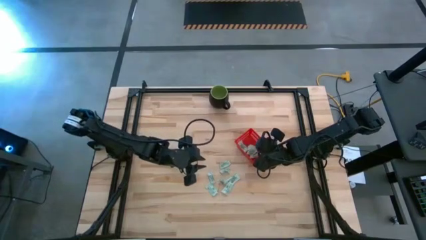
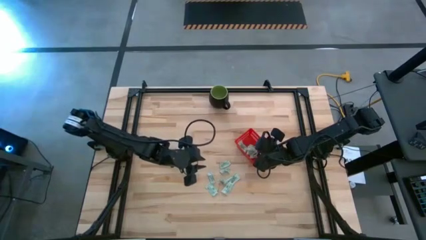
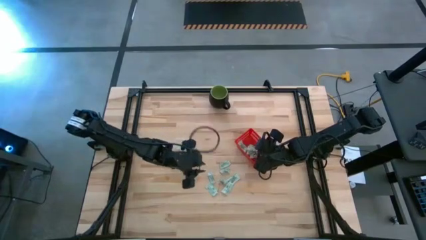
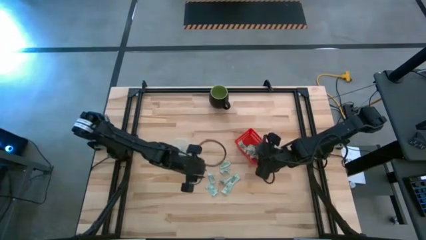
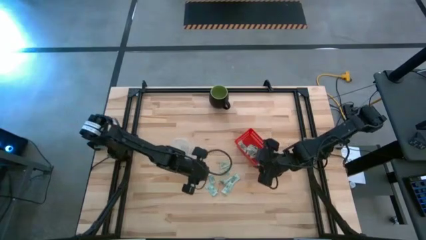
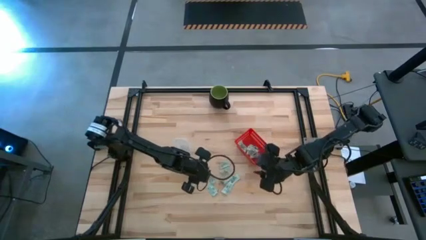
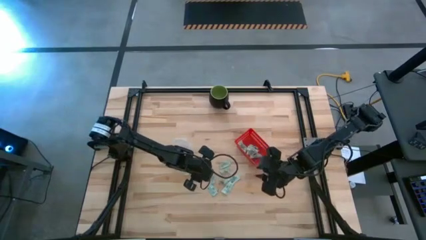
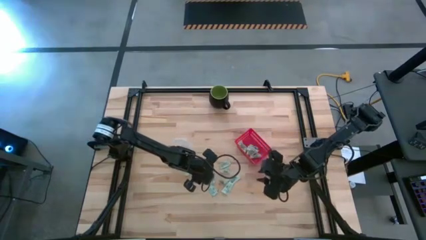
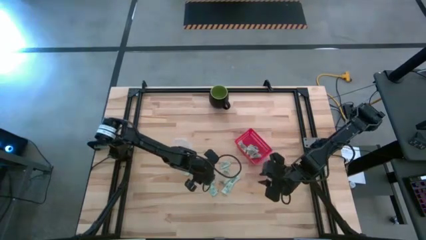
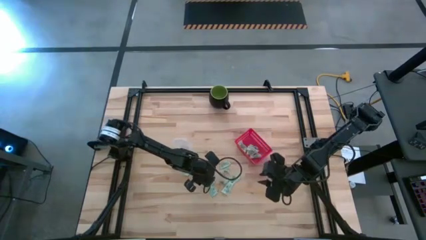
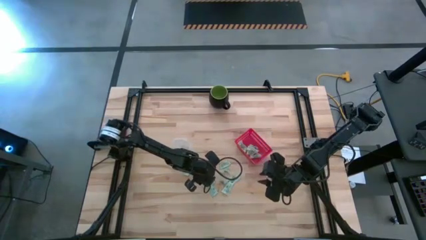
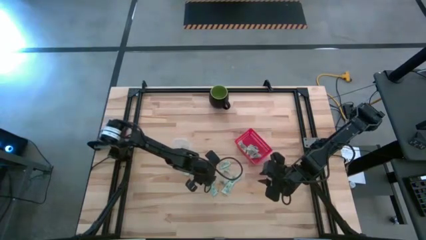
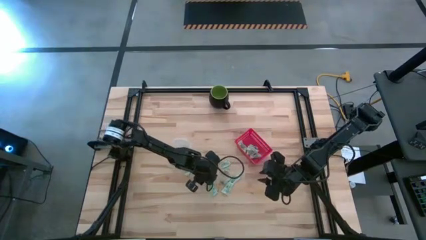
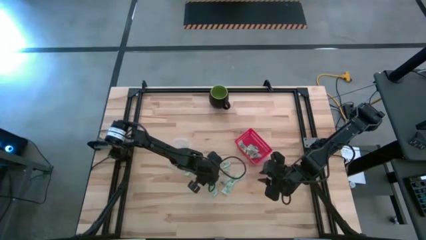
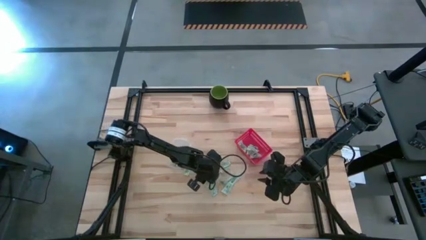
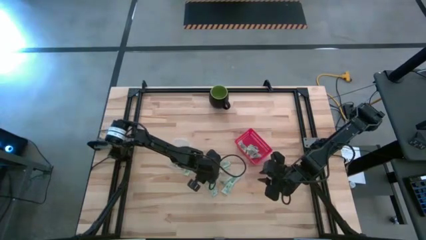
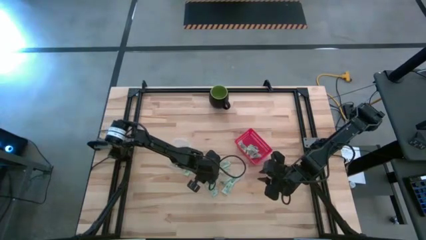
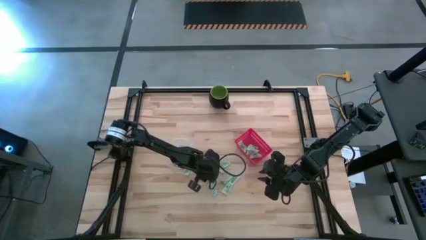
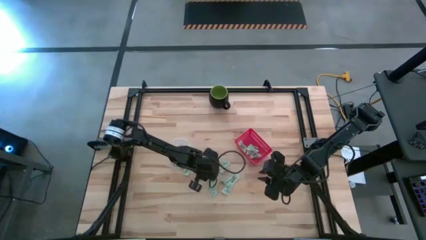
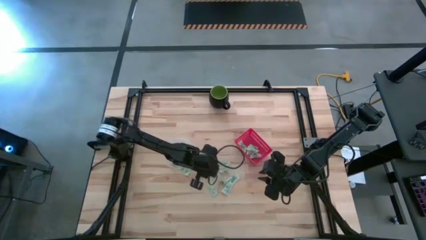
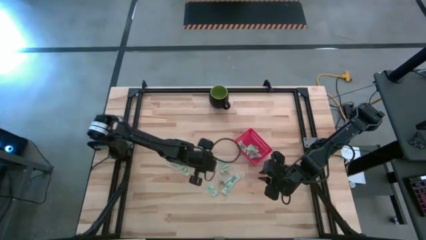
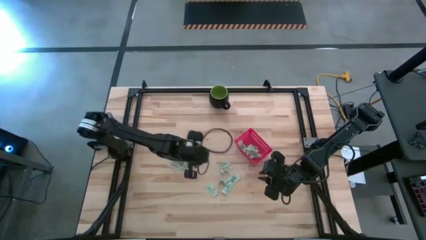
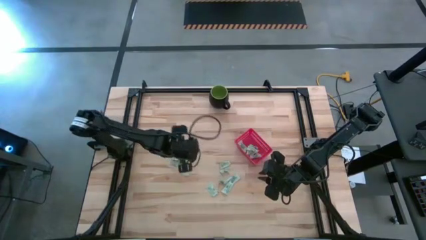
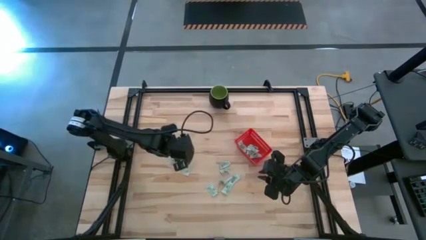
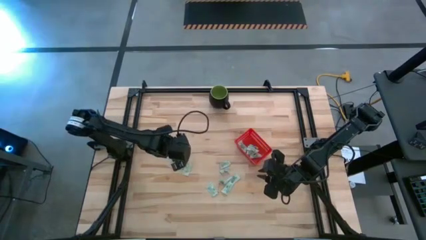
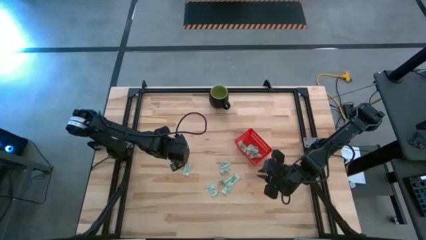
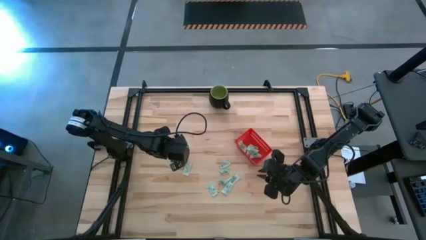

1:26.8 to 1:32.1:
Task: Pick and place items into bin
Put the stevia packet into the transparent bin

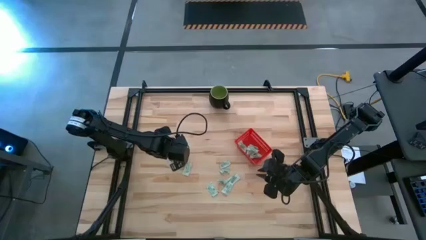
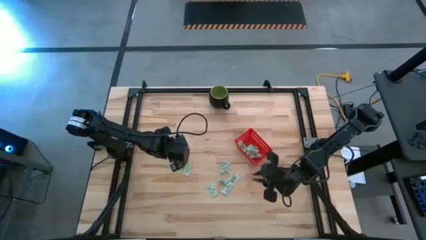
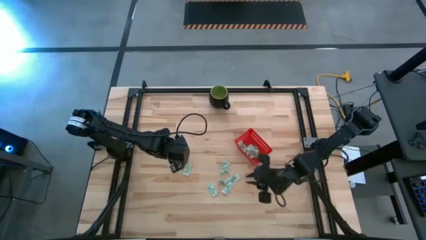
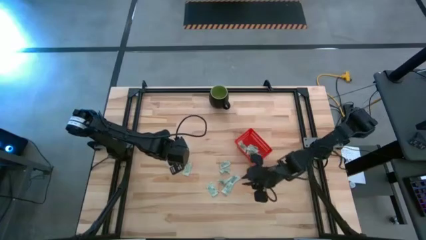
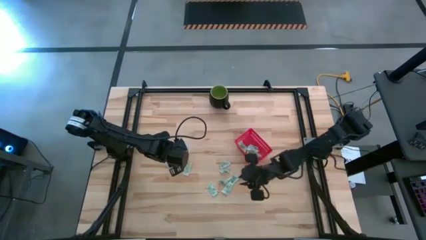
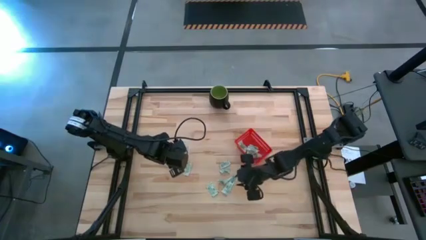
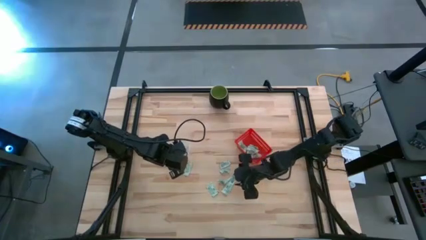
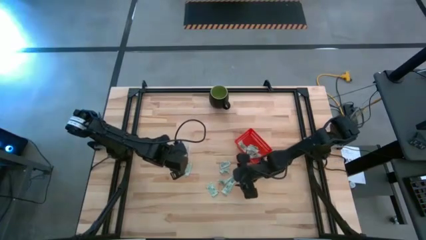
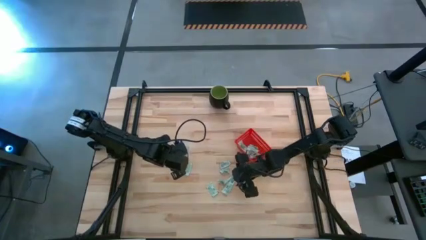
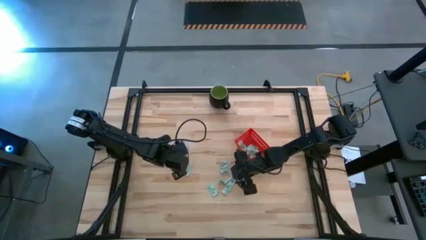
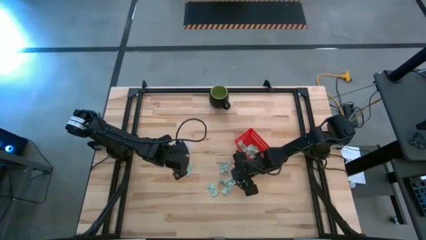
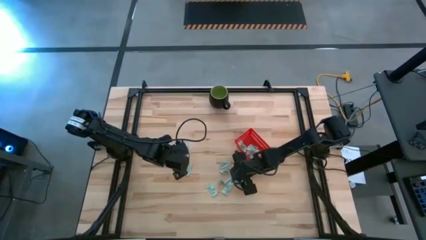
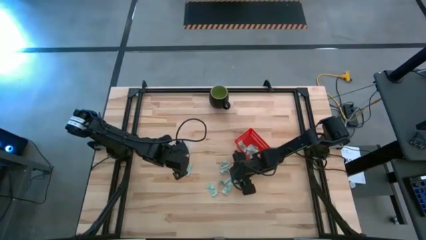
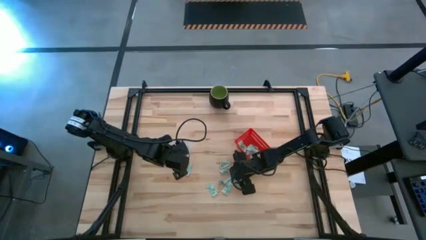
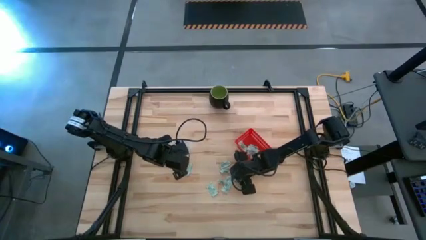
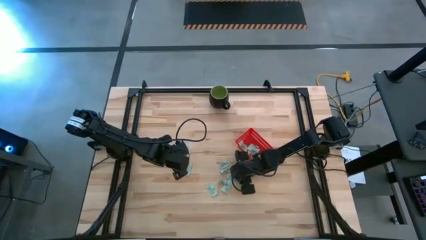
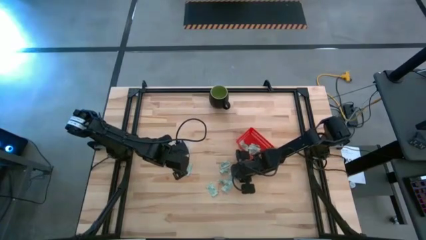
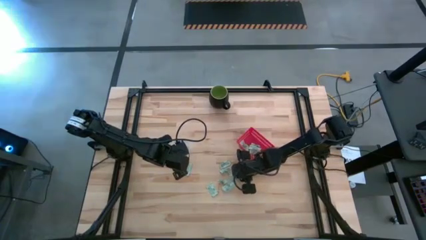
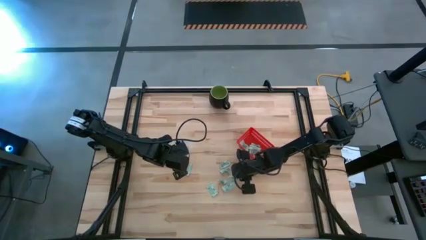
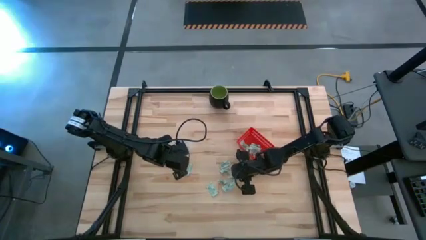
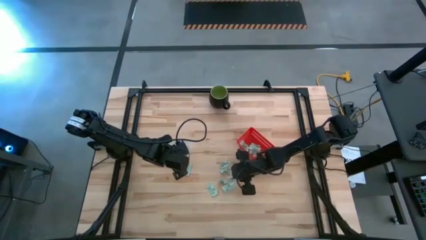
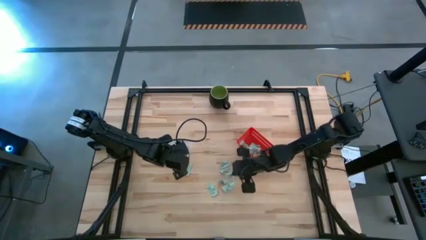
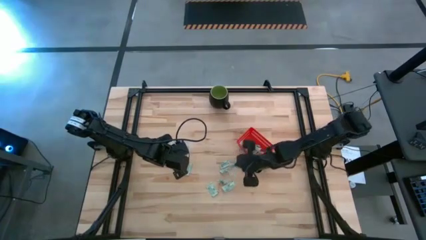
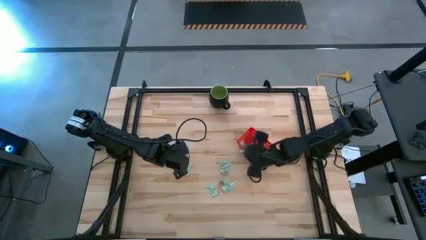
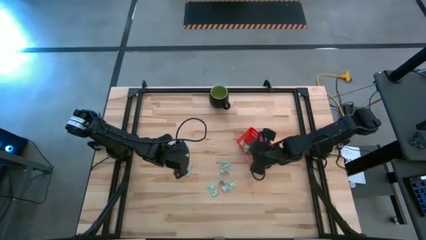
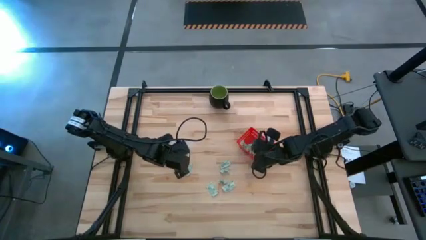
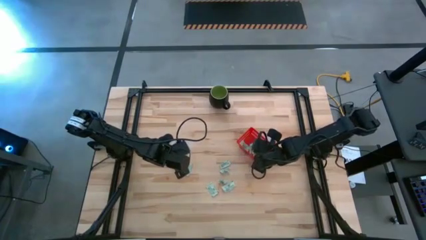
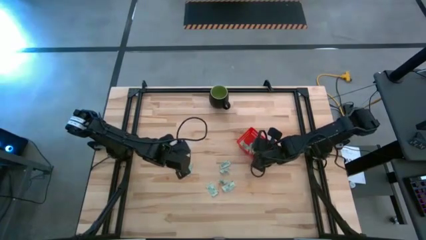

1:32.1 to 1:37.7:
Put the stevia packet into the red basket

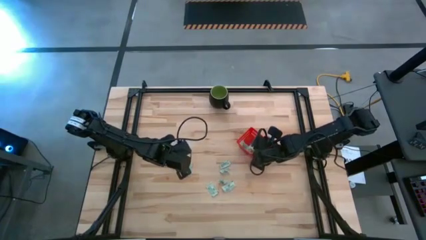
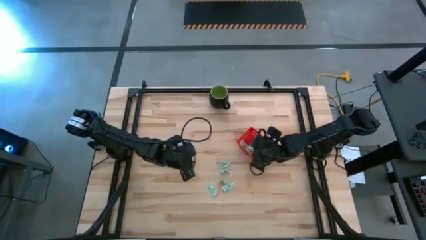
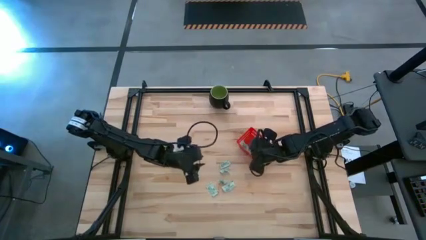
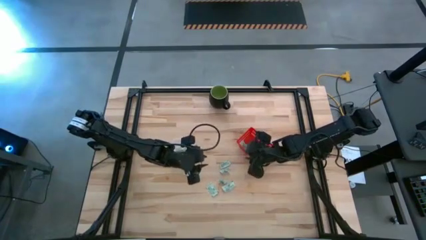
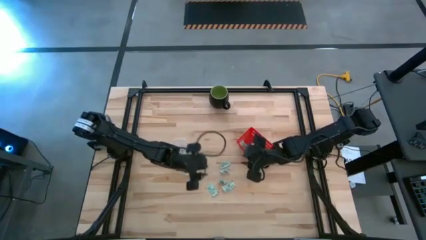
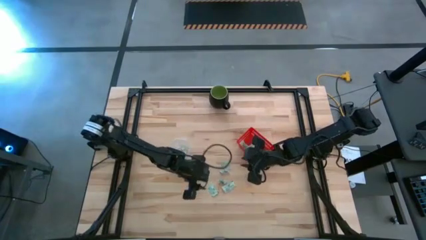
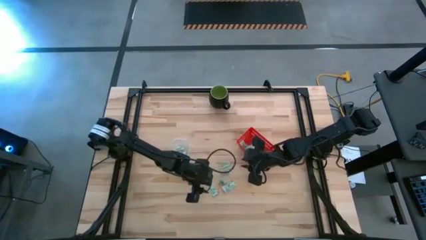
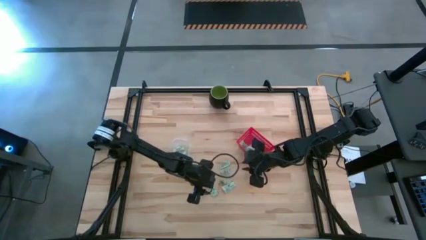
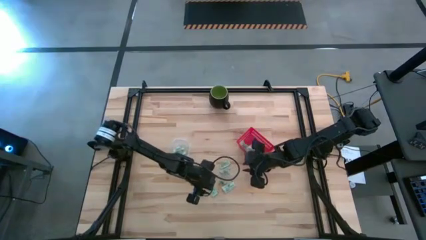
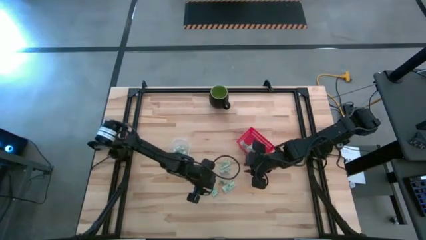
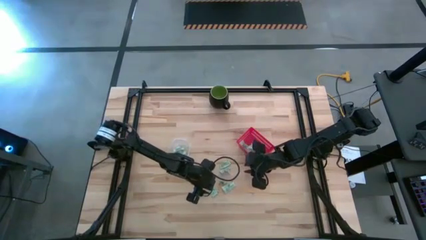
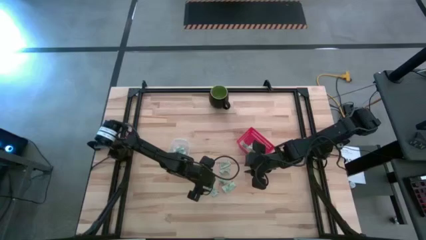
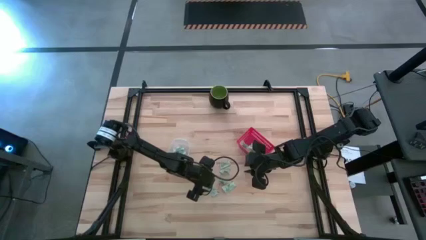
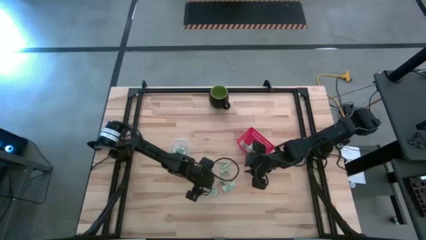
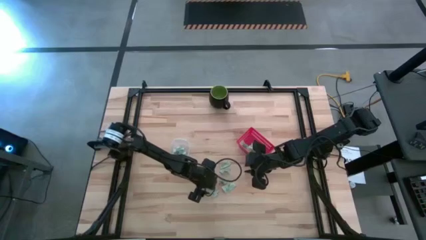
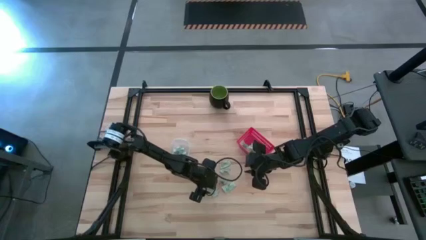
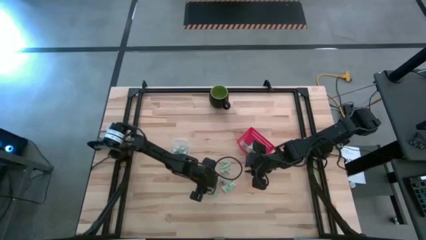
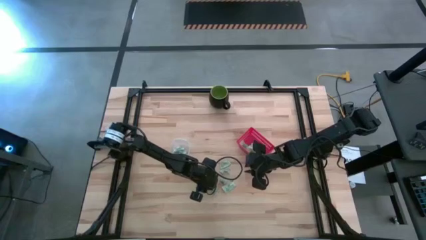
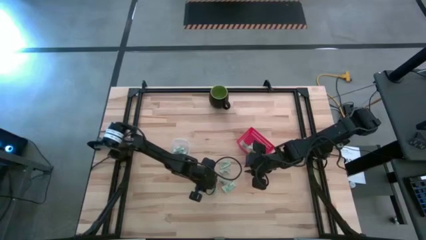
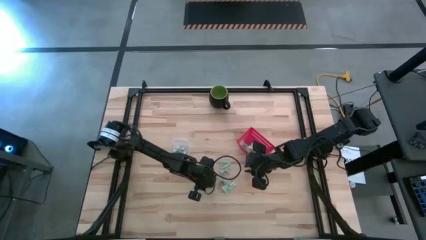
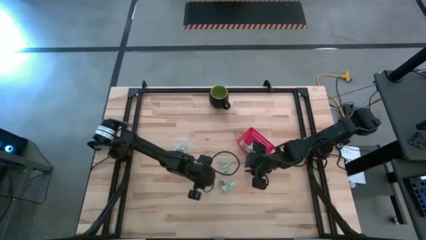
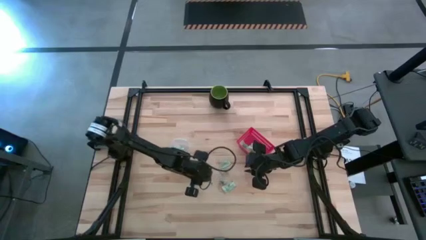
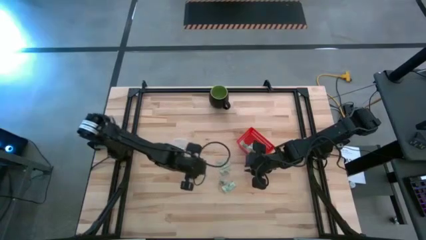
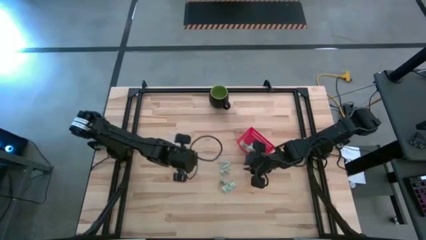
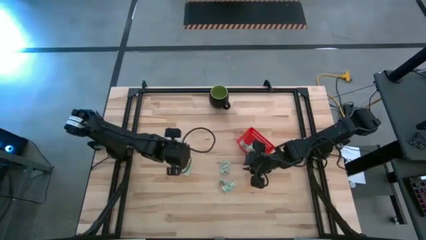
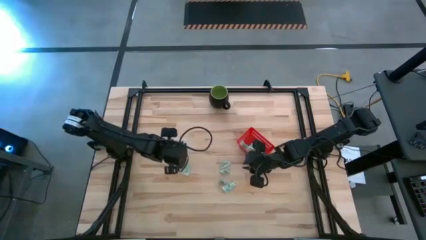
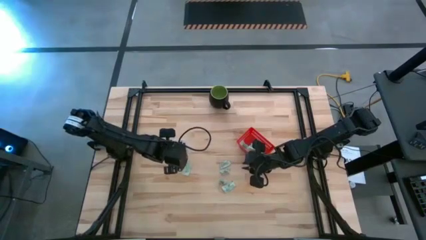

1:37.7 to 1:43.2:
Put the stevia packet into the transparent bin
